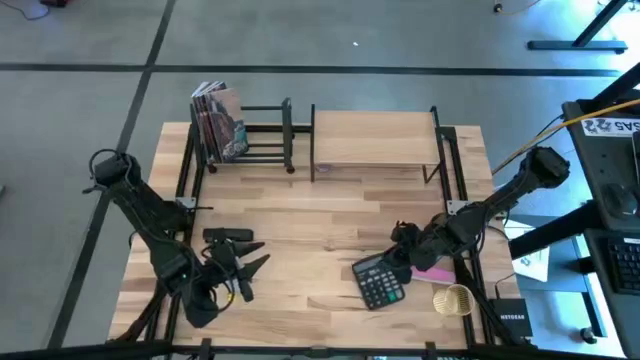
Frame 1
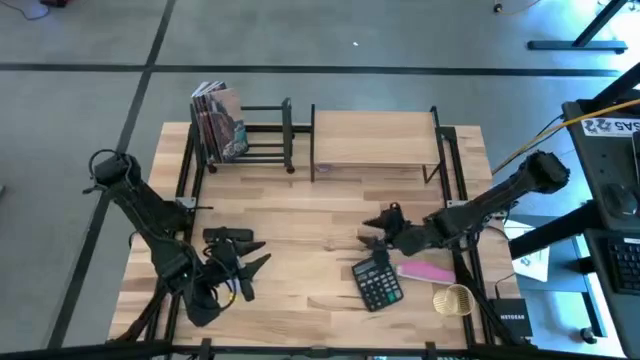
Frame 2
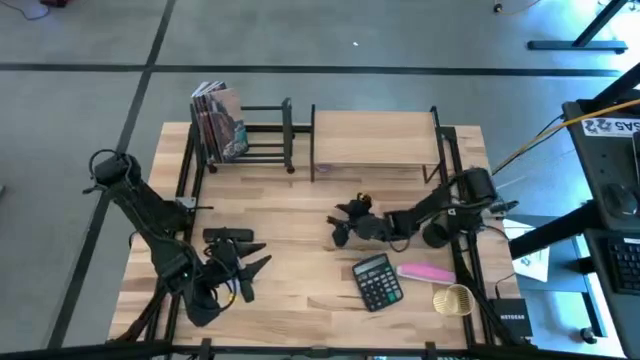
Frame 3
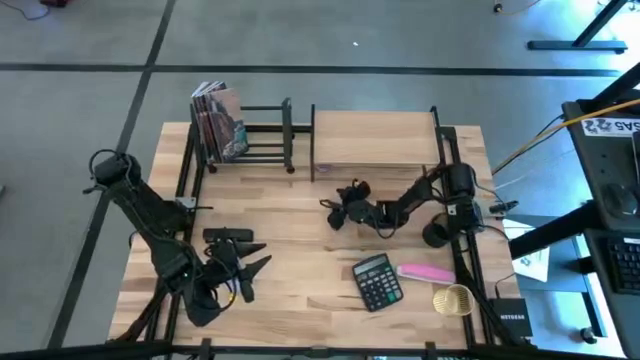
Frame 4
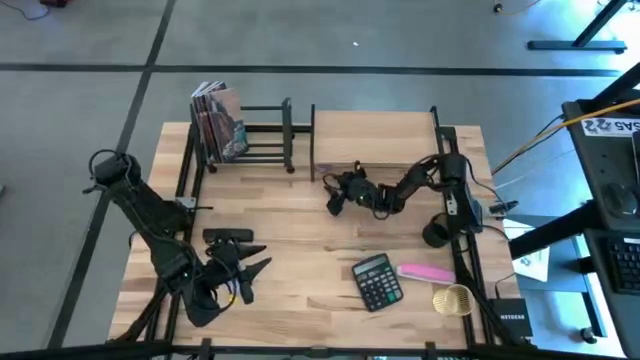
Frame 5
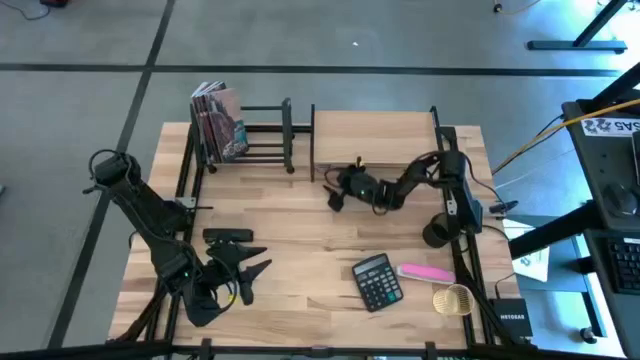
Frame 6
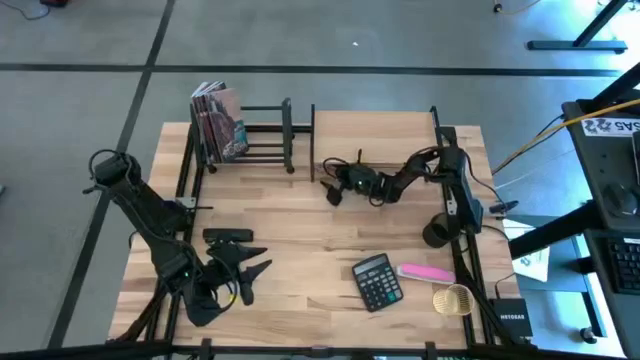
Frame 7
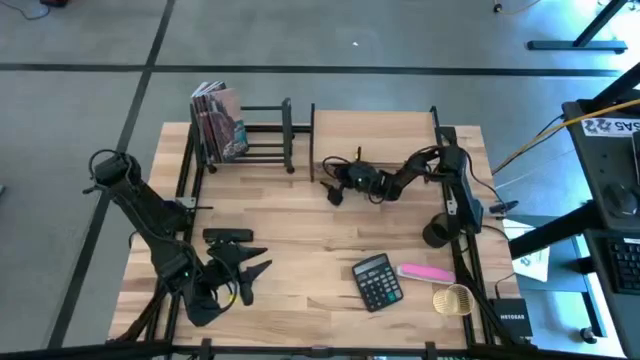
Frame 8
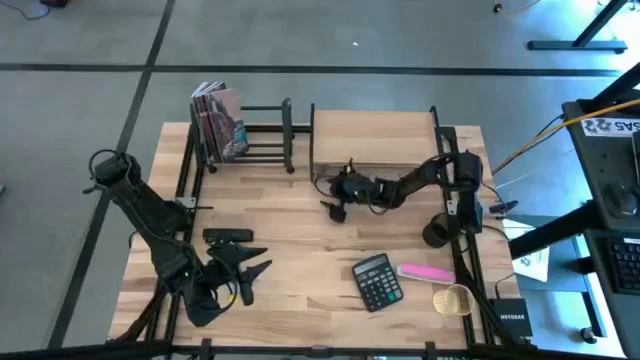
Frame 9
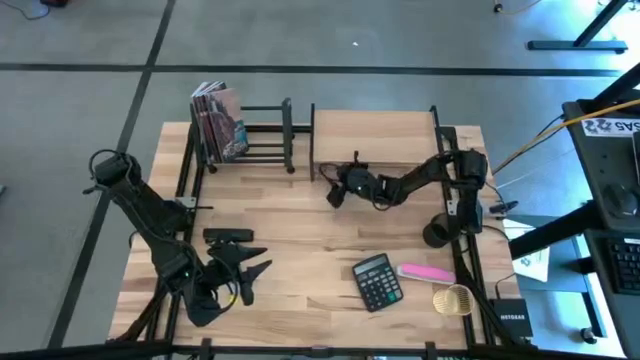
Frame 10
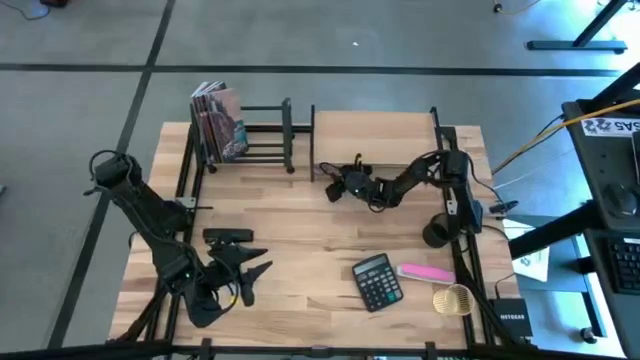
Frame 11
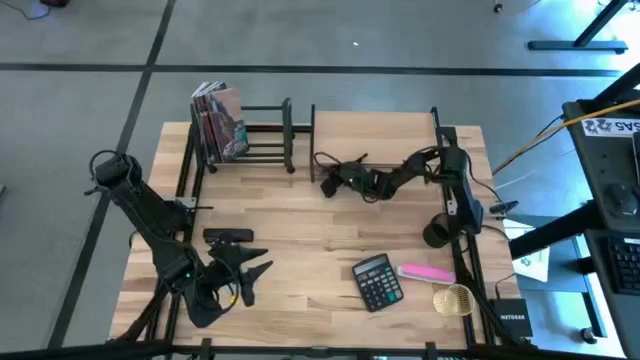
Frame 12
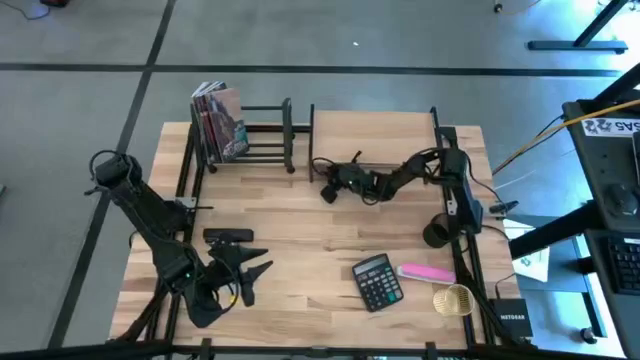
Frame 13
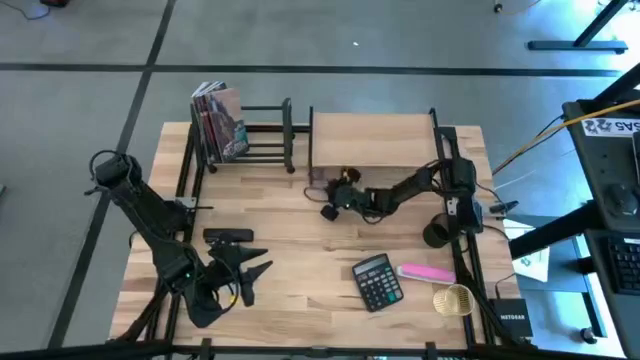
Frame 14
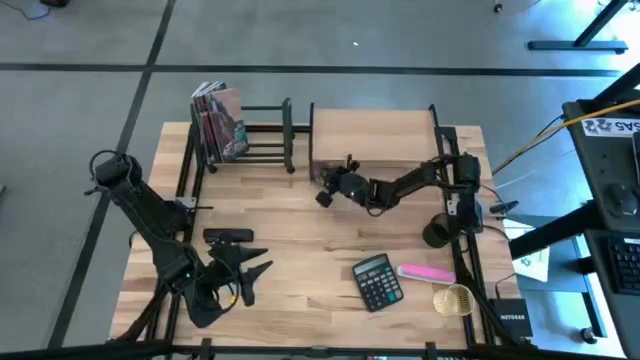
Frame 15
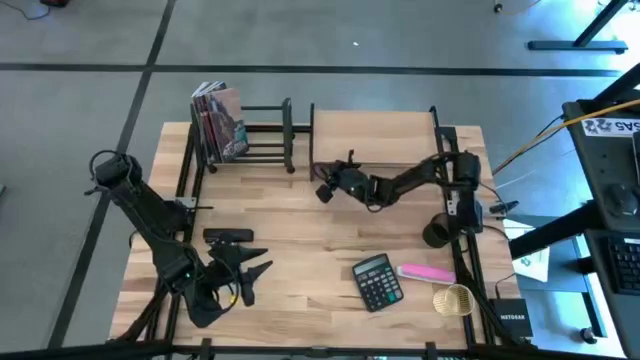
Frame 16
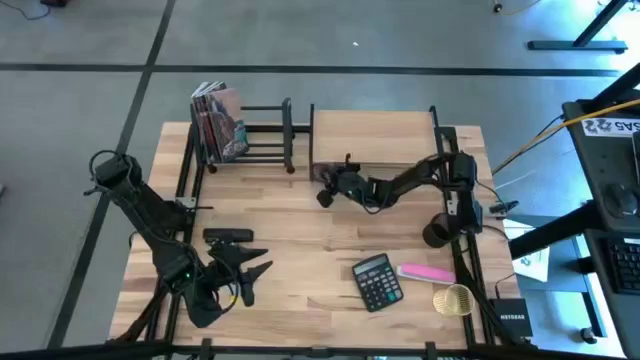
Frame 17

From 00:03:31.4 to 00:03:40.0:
Task: Stock shelves
Remove the red scented candle jar from under the shelf

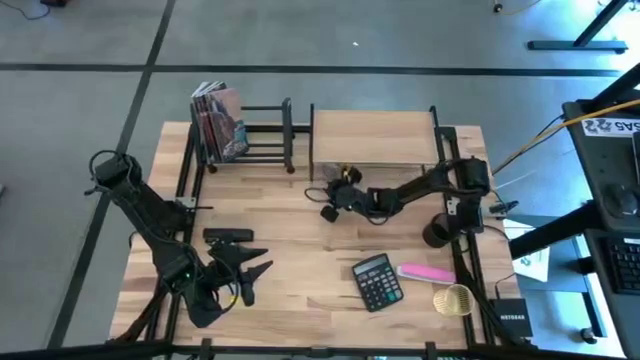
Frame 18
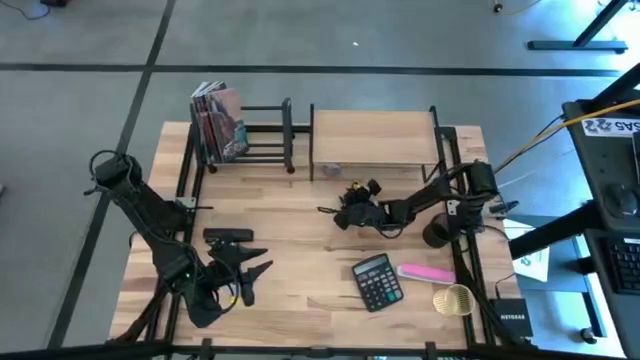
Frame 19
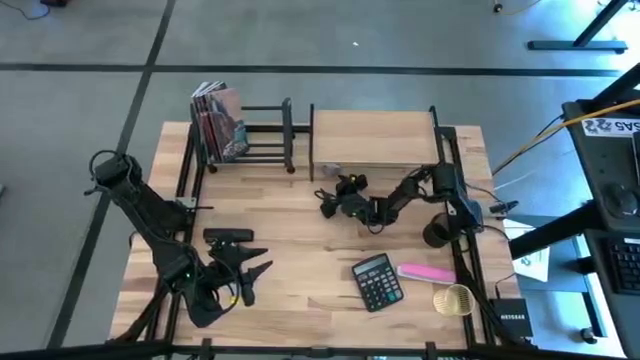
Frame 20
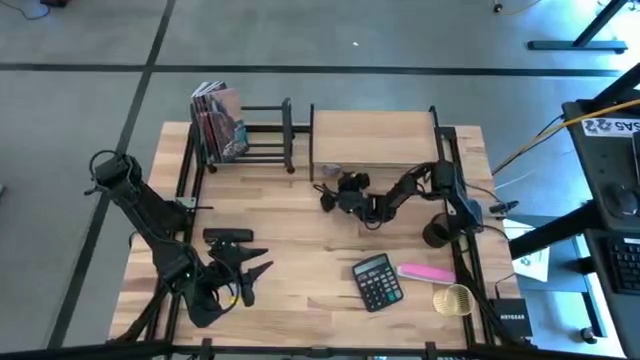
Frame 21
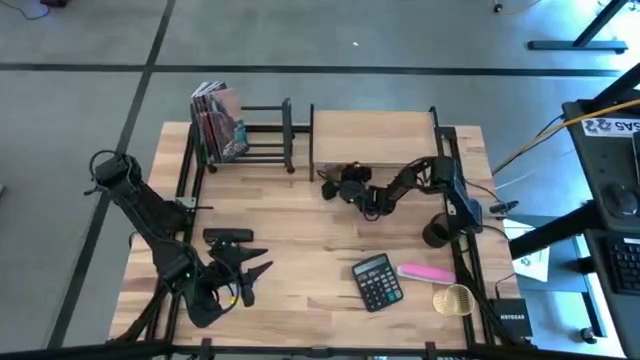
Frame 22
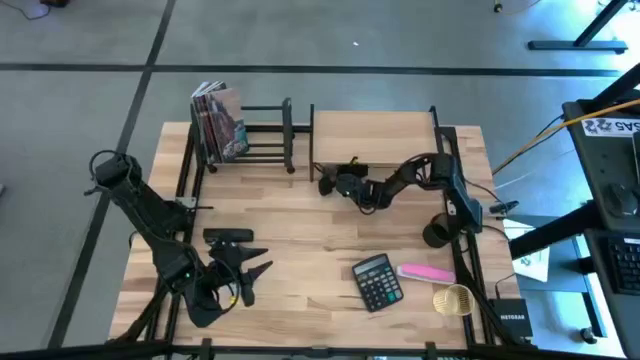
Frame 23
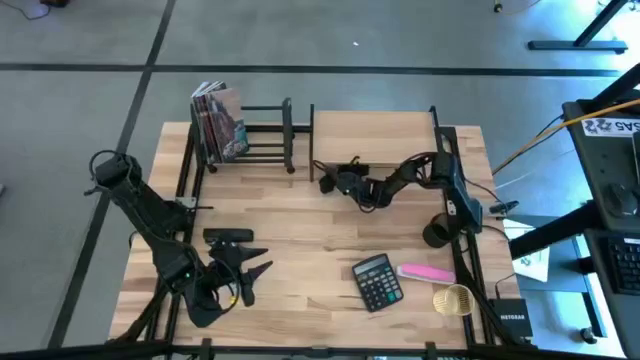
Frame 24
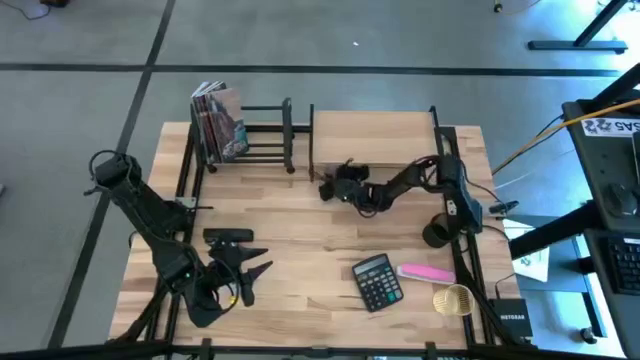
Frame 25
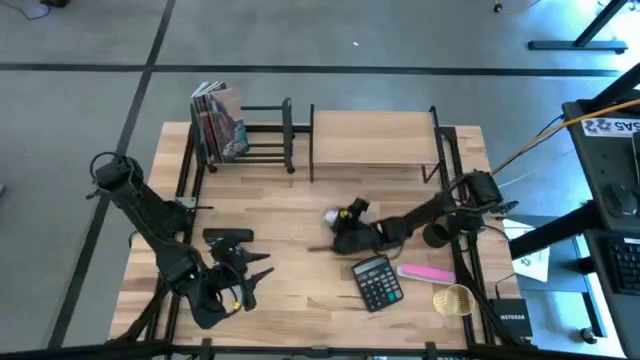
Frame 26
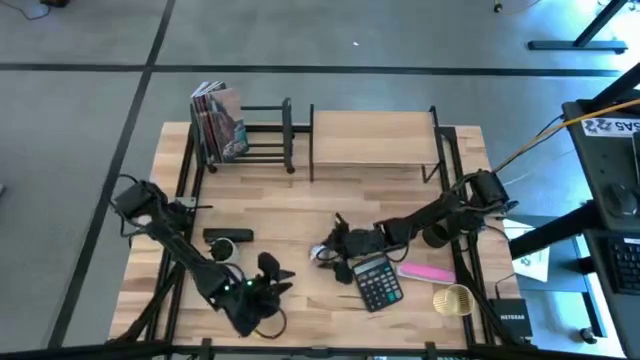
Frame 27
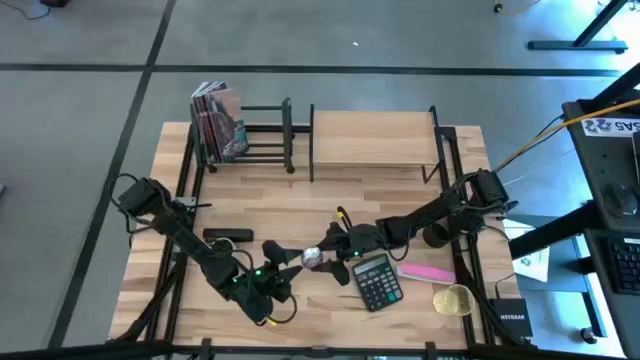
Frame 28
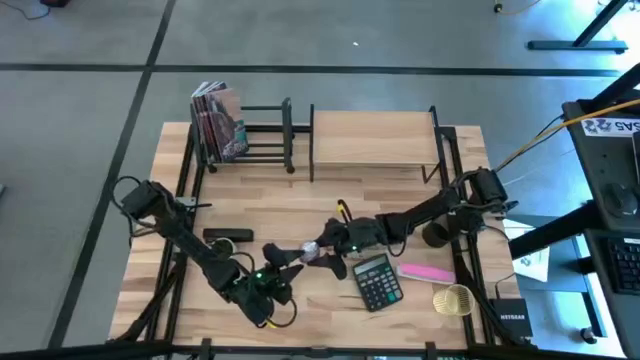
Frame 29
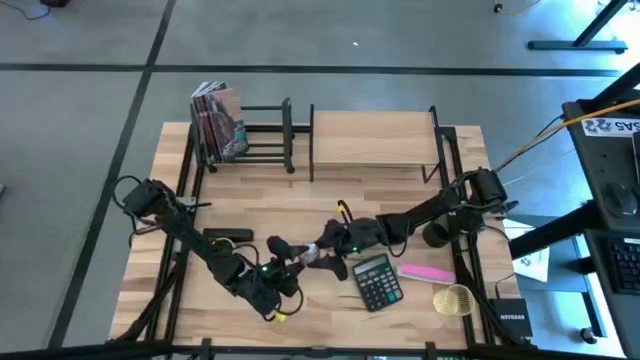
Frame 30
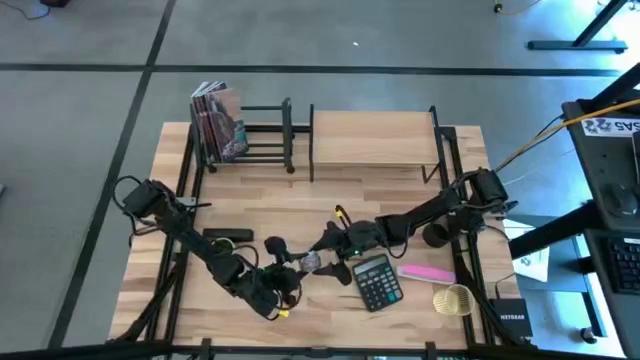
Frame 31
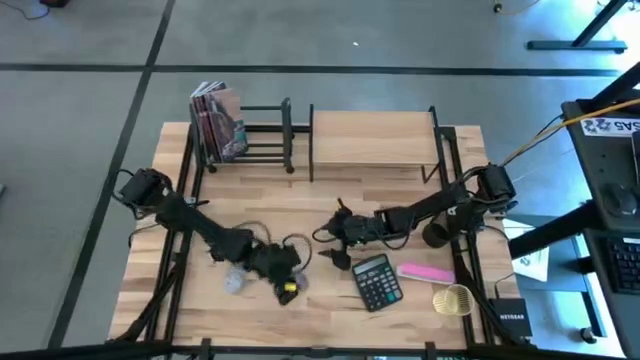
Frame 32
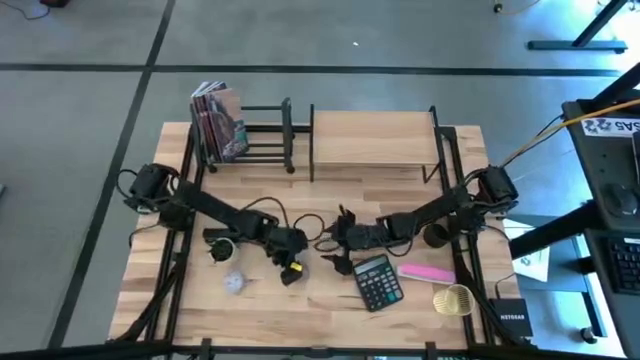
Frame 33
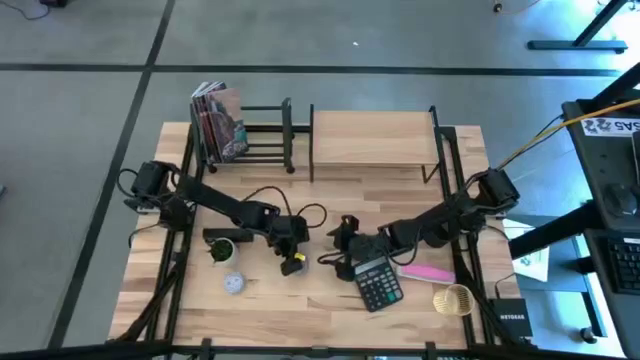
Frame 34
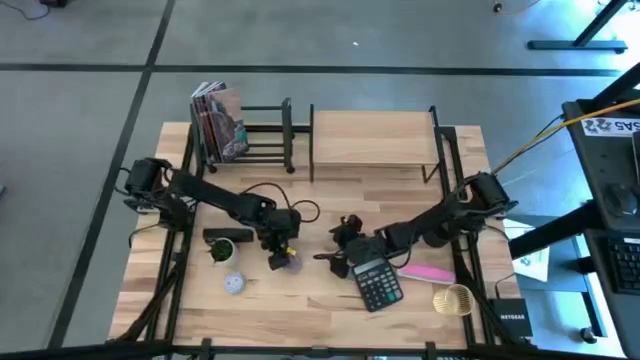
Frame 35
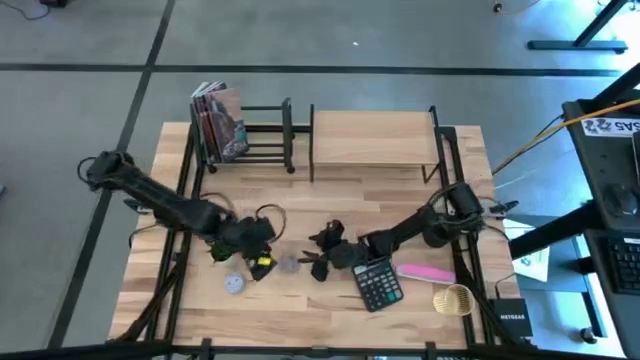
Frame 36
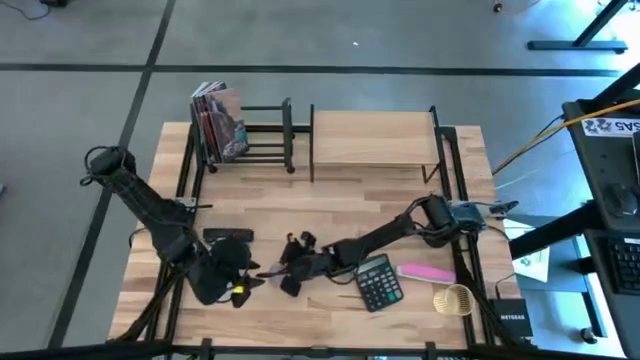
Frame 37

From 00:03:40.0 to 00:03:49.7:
Remove the red scented candle jar from under the shelf

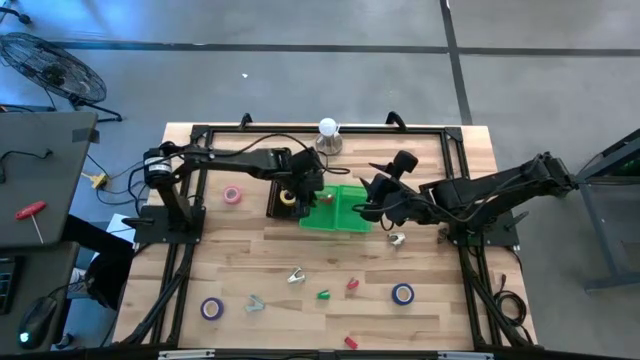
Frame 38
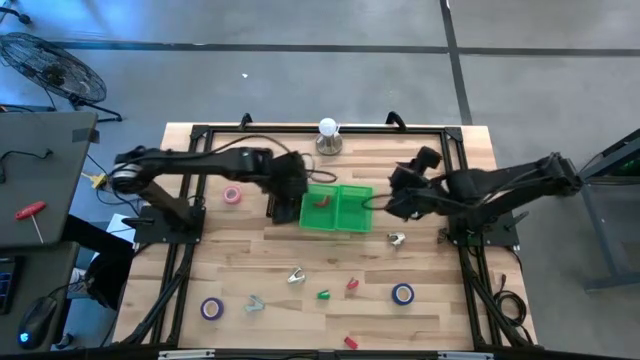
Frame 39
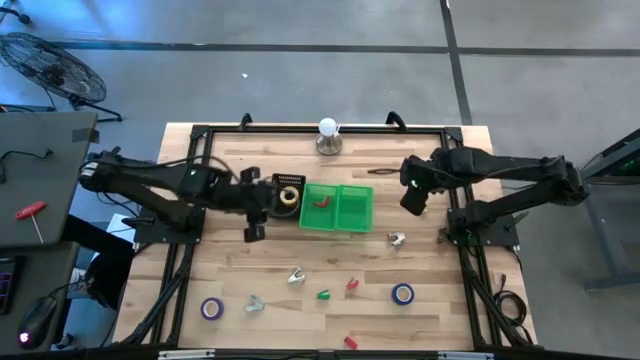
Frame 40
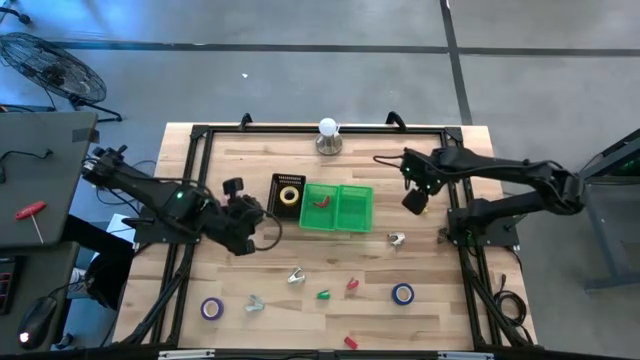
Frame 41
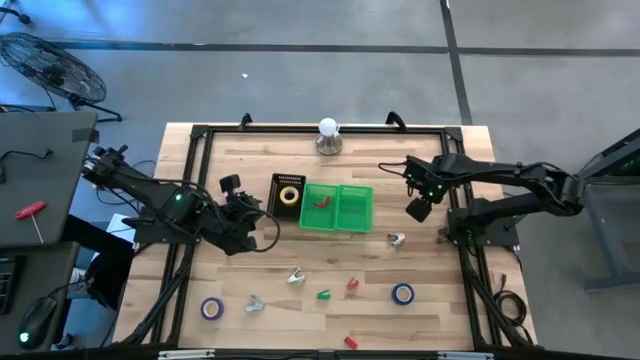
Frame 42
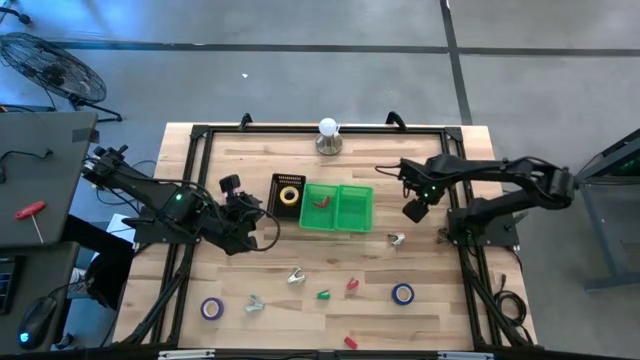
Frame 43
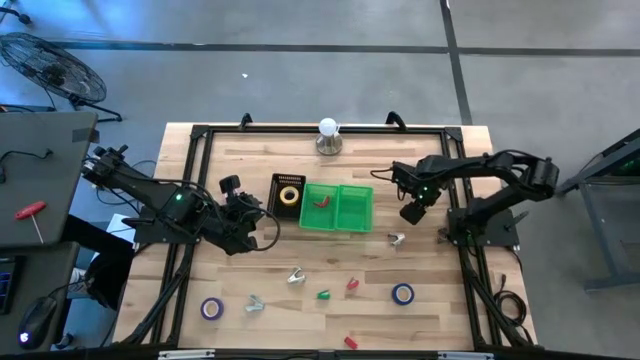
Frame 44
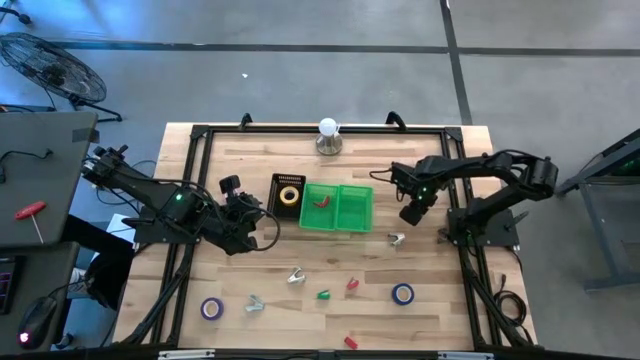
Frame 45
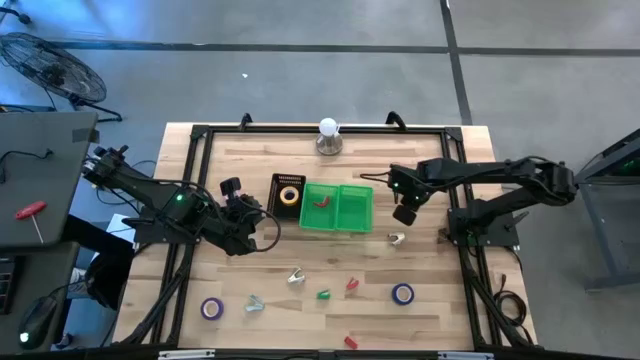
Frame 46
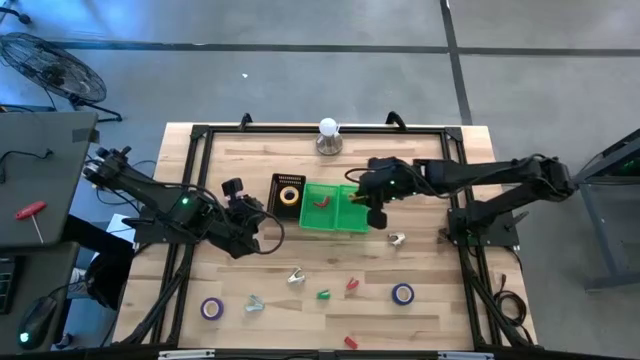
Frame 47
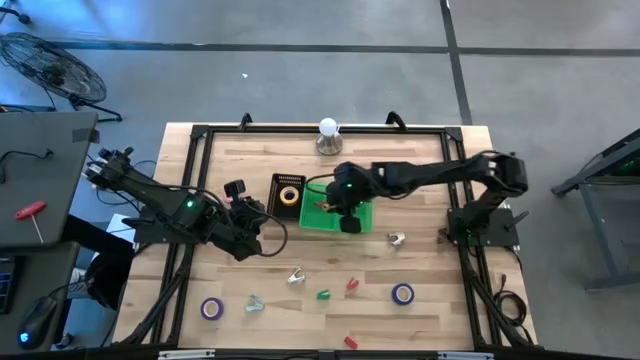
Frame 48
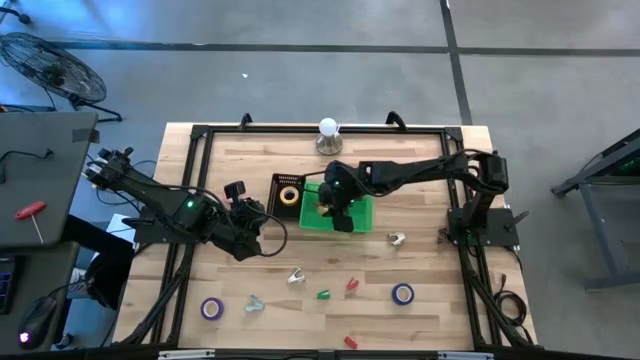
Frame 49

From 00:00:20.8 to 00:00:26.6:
Task: Pick and place Stapler, Stapler remover, tape
Put the yellow stapler into the left green bin
